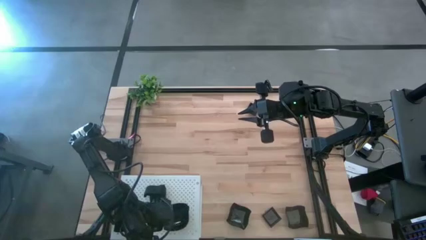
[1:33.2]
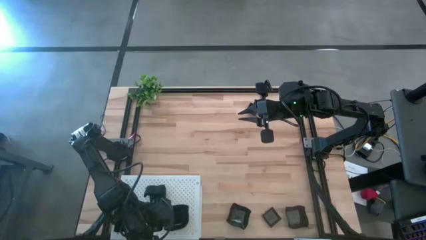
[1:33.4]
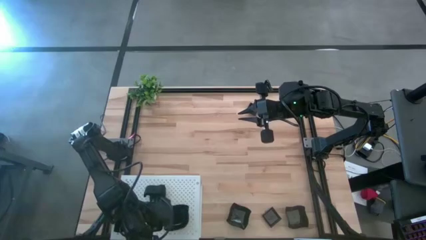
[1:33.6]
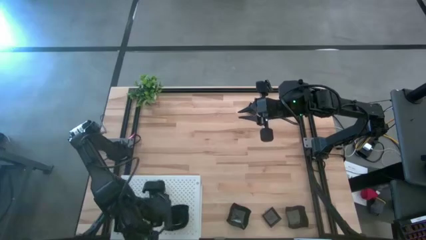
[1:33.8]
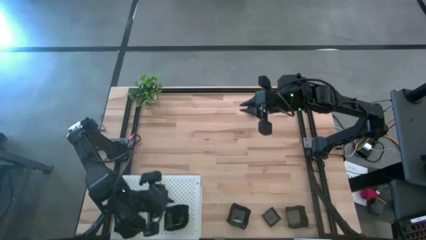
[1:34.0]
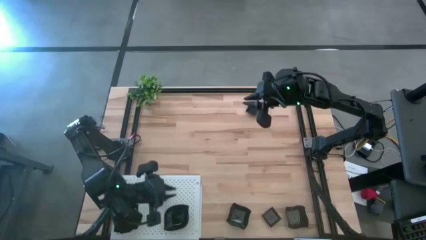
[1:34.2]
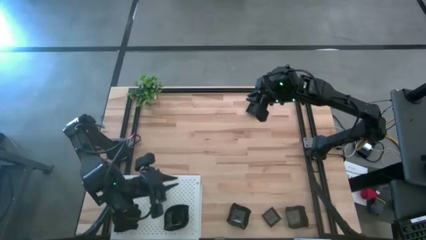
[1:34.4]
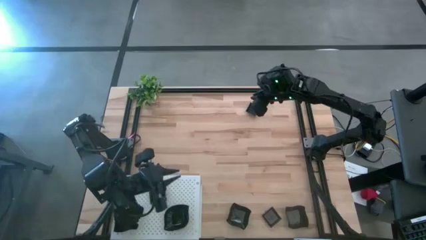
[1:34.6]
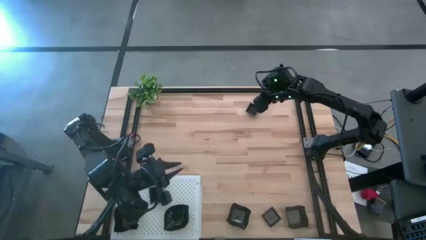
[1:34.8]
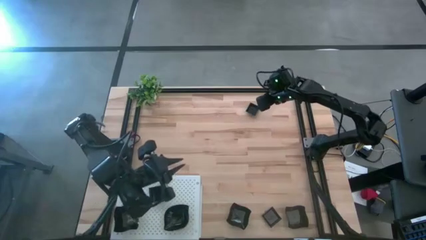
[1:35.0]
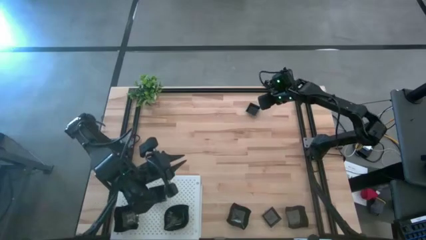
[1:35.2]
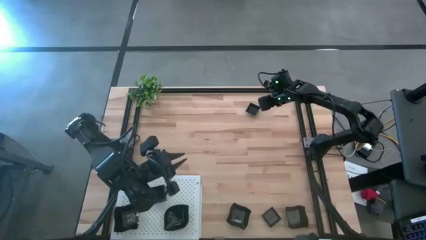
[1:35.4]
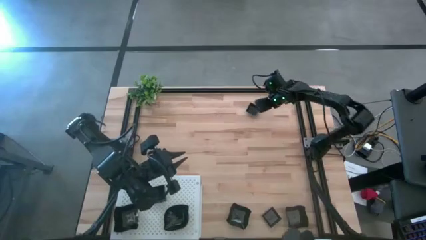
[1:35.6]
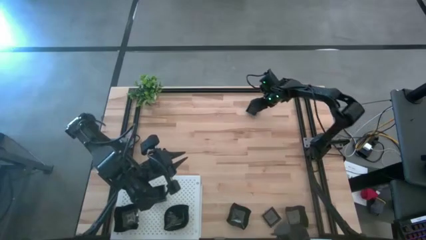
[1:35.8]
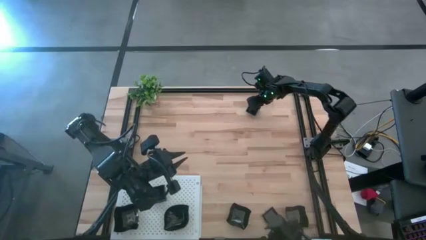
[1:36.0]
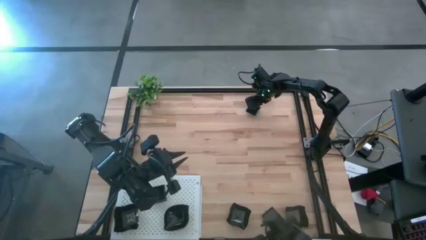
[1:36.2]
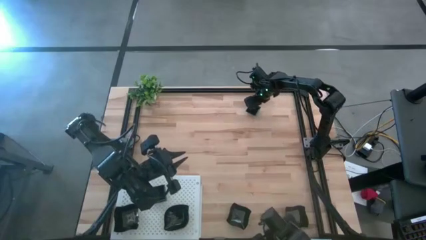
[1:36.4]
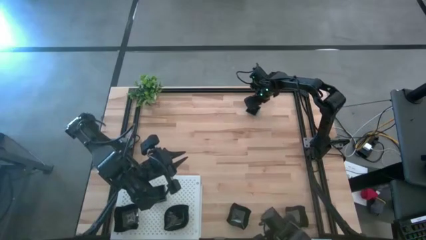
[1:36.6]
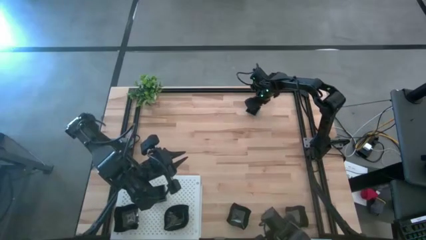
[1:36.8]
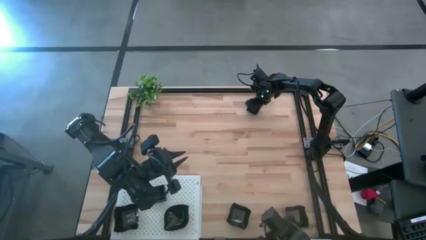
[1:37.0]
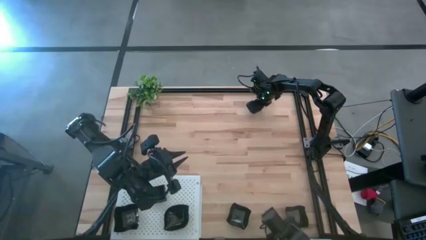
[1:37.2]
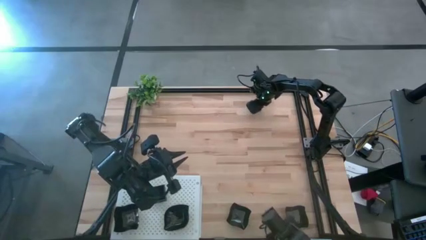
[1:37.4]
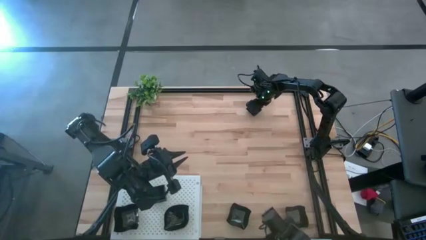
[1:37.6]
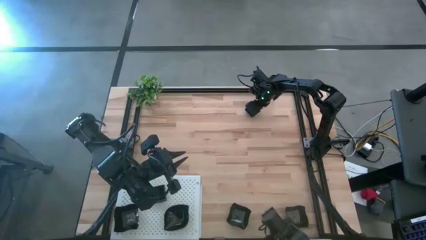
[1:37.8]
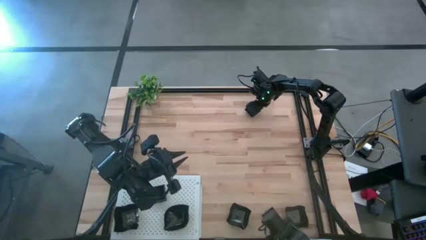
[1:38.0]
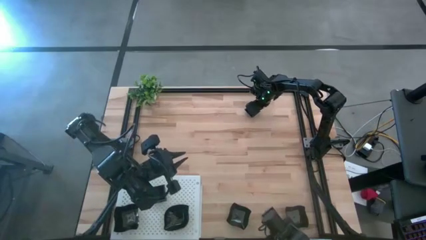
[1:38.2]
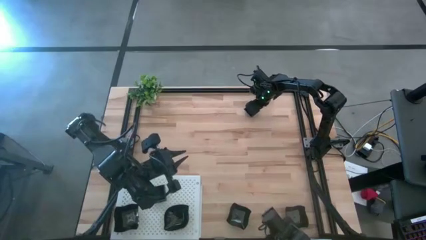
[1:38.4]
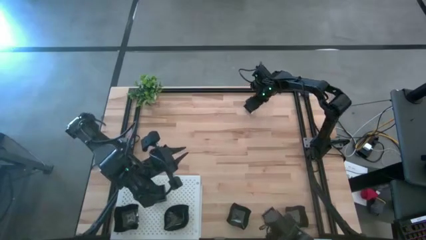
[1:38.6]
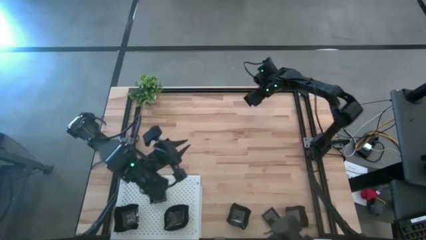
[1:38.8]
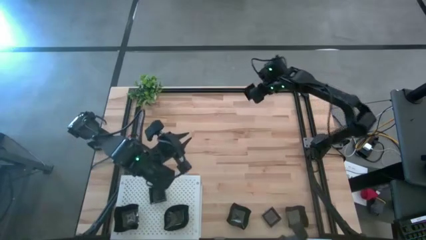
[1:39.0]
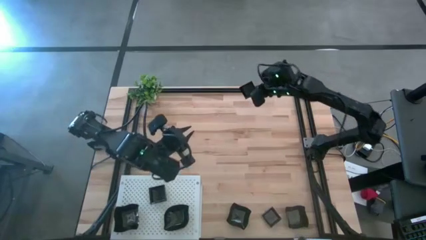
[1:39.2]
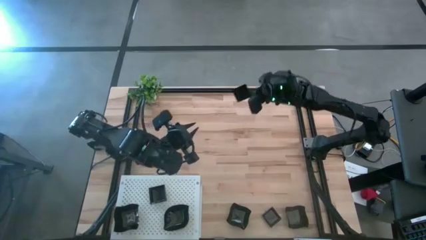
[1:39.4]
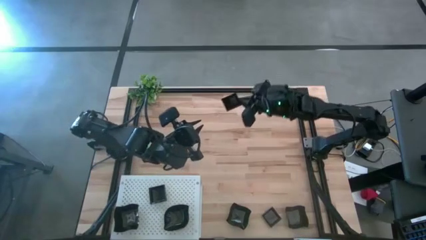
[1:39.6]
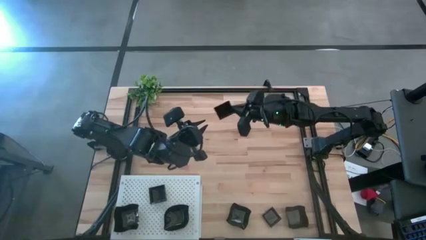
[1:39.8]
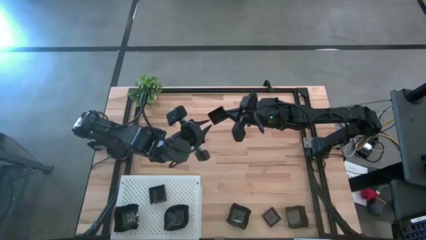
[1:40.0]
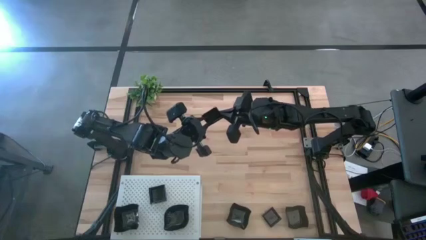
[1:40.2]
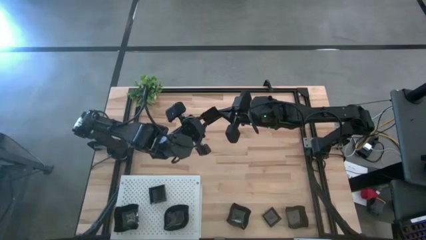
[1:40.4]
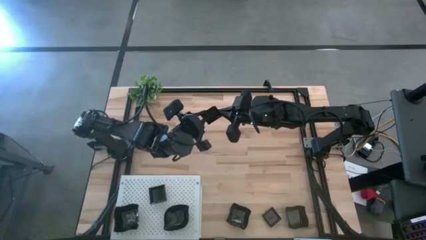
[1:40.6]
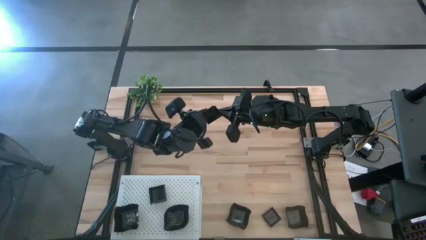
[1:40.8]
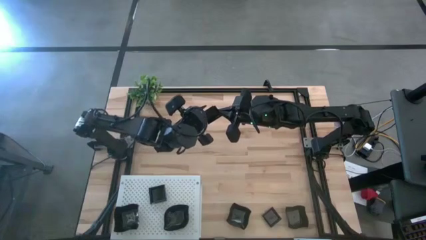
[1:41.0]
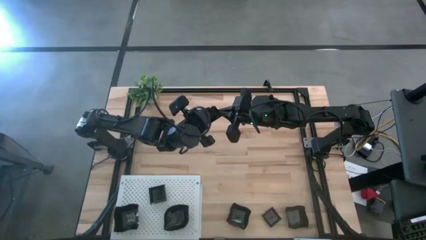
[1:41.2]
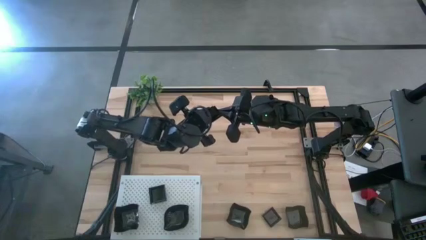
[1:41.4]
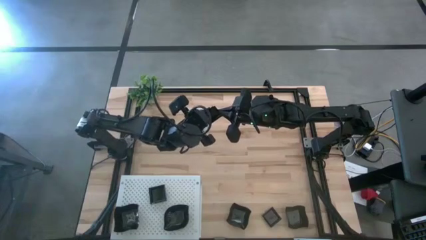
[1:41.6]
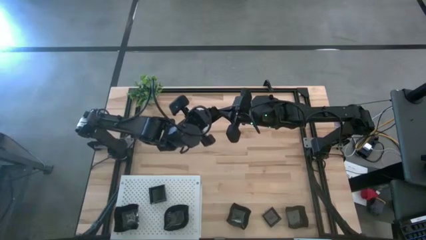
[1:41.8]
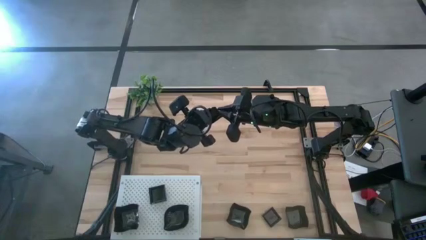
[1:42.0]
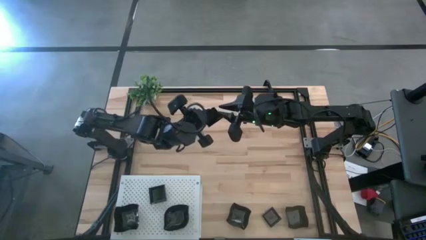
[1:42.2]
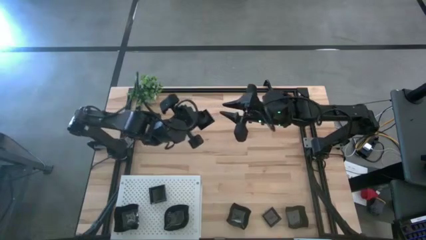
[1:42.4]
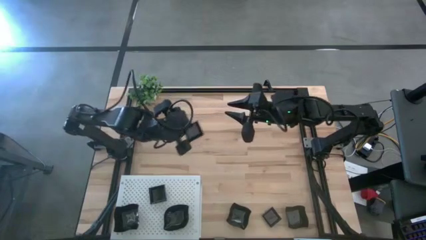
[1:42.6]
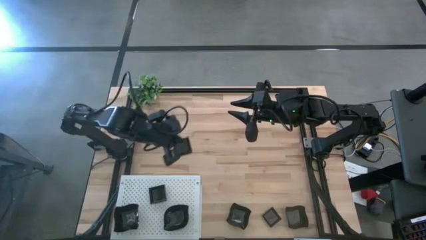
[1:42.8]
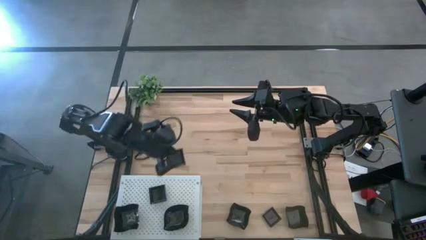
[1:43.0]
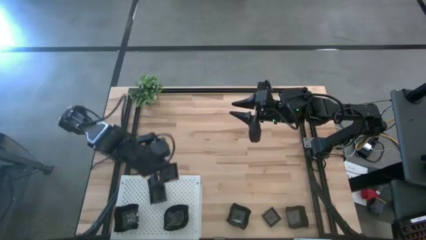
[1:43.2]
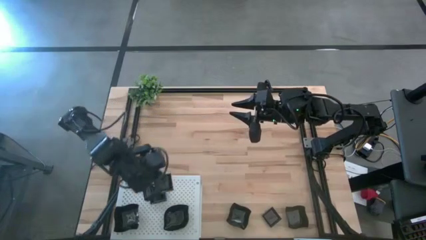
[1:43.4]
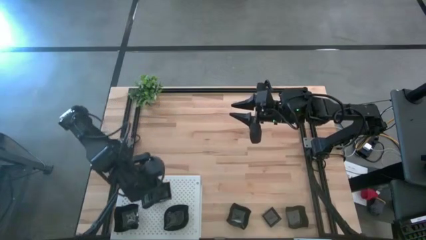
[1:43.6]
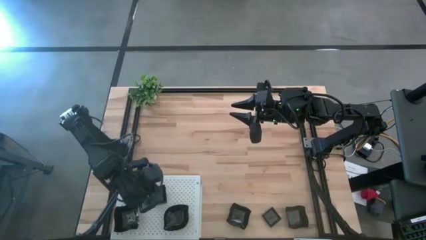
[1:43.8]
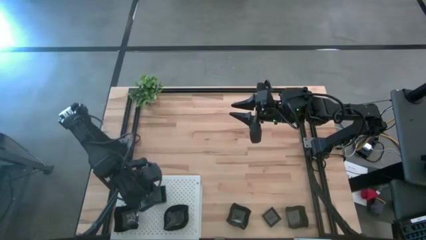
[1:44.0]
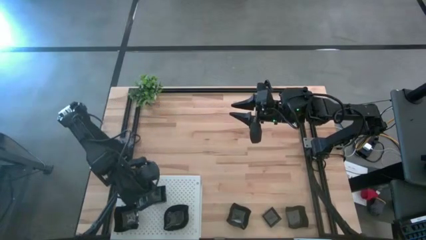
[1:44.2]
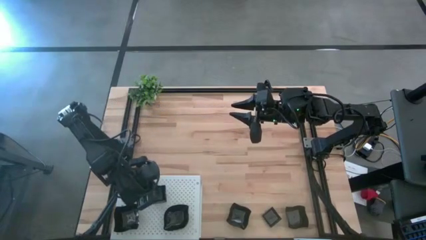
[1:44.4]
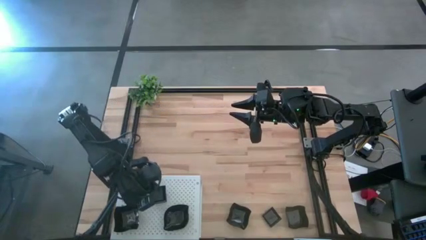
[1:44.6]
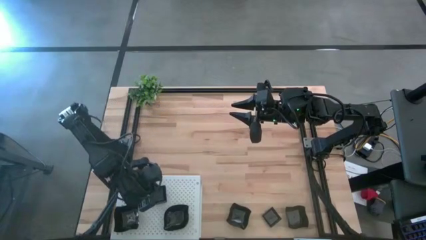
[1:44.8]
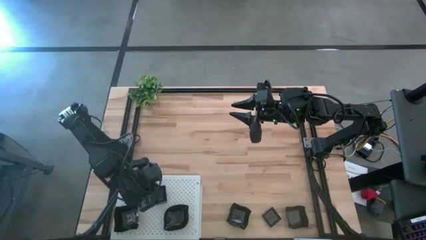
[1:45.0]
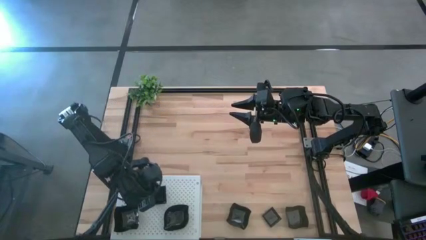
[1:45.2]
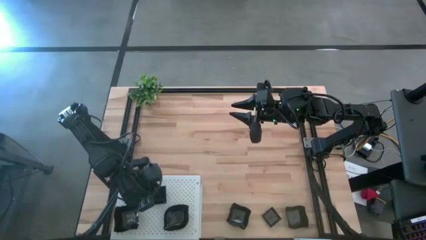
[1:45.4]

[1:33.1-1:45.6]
Task: Pick & Place Mini shaped plates
Stack the square plate on top of the square plate on the shelf
